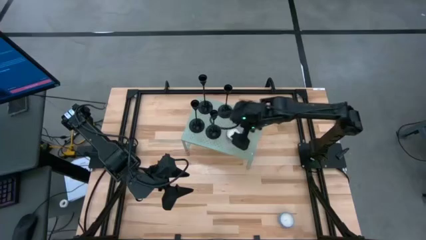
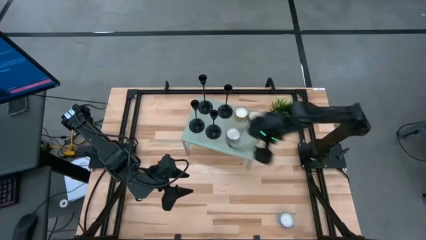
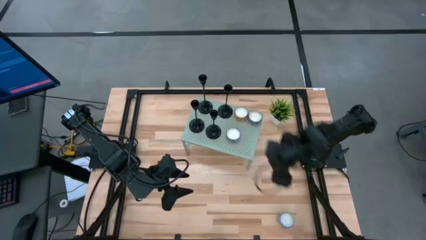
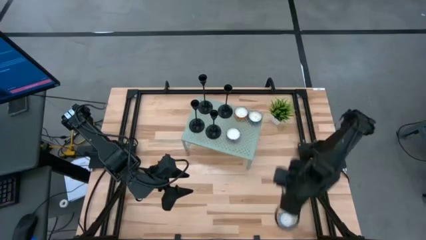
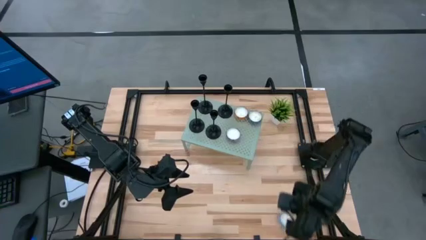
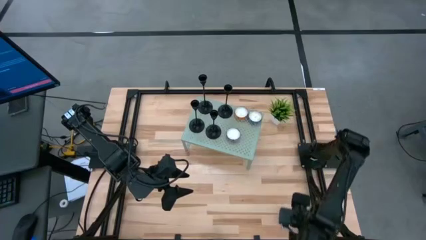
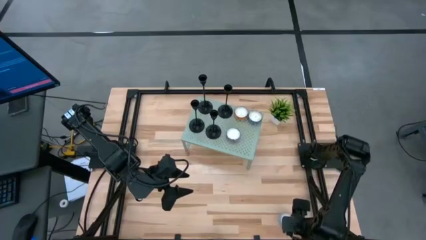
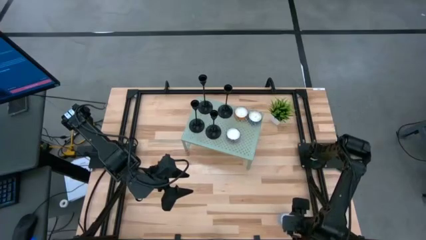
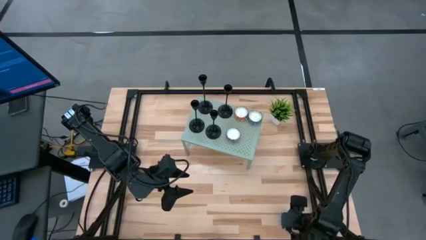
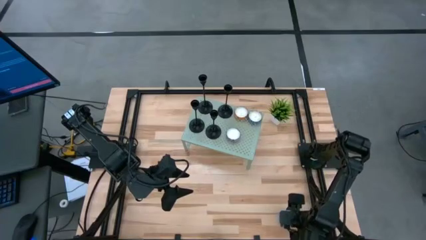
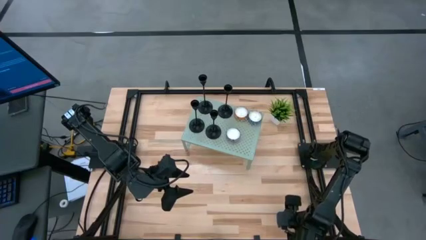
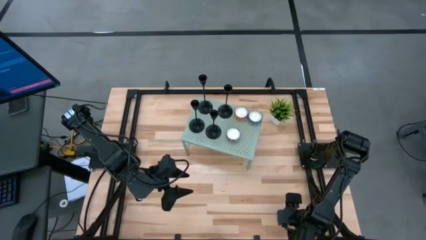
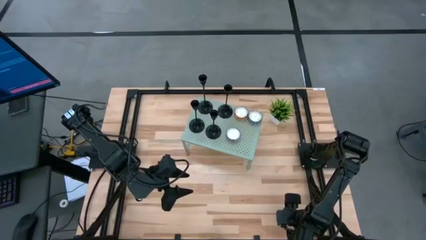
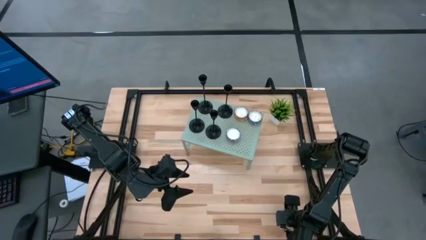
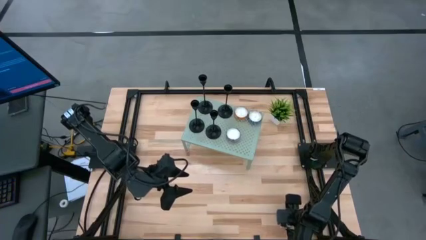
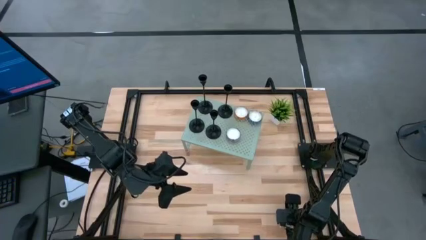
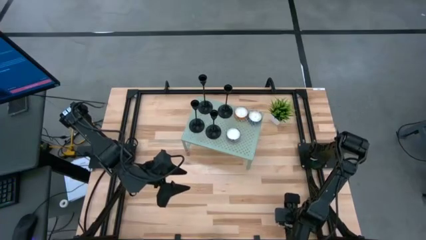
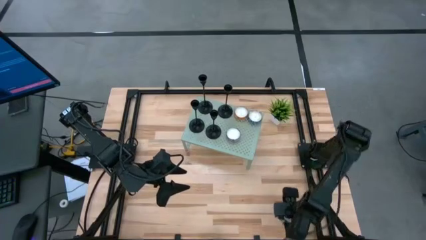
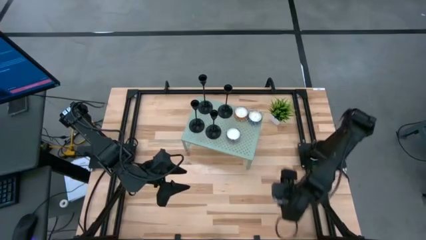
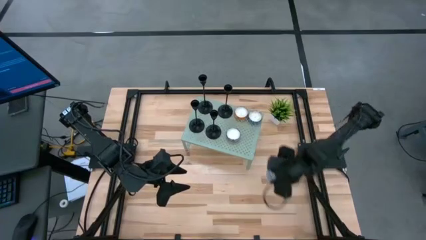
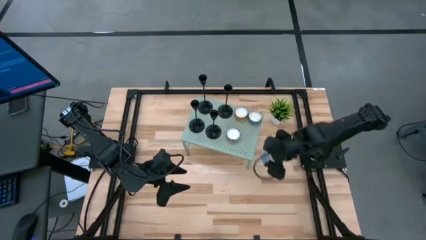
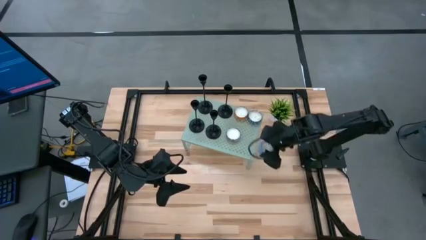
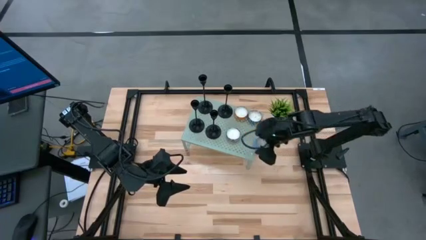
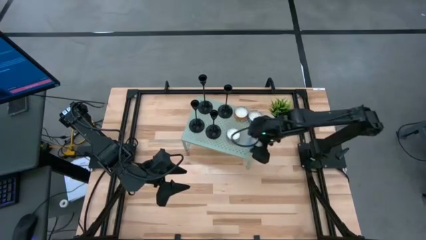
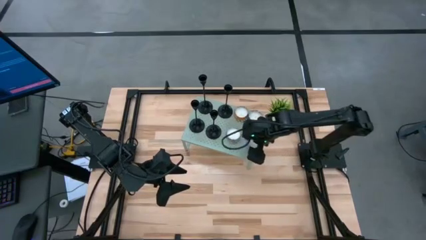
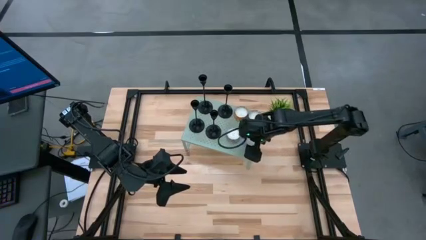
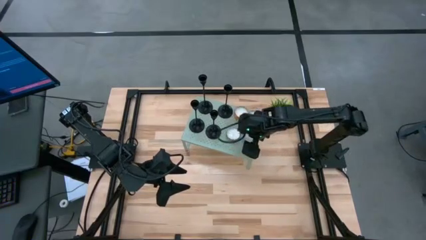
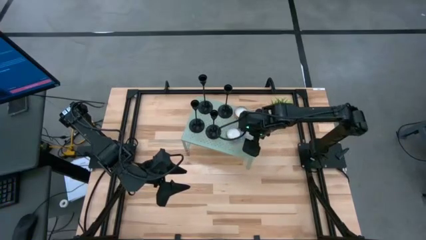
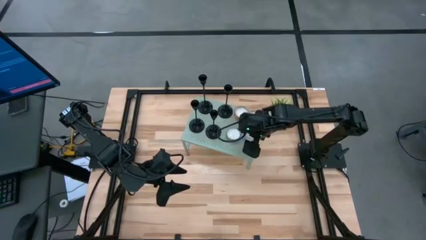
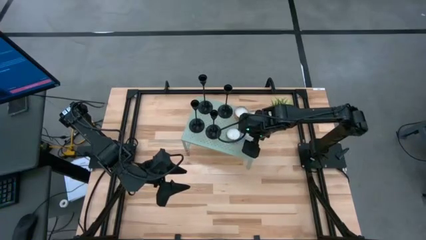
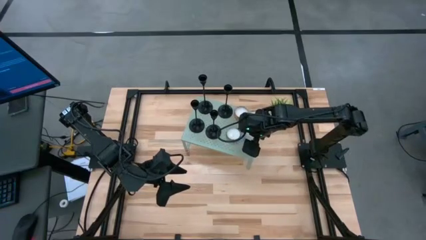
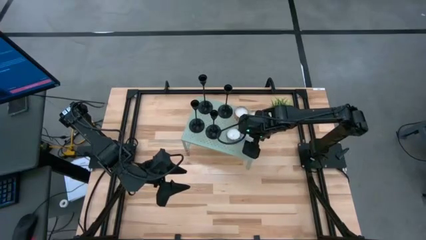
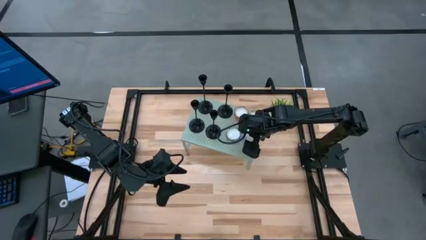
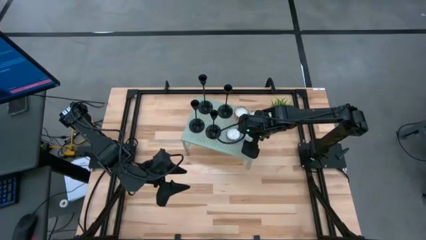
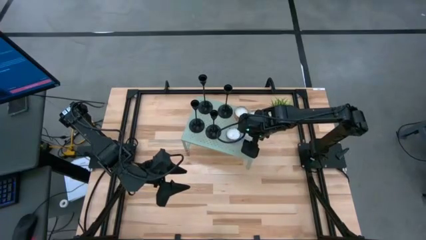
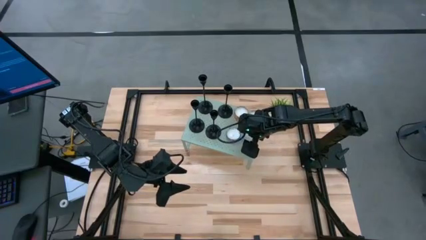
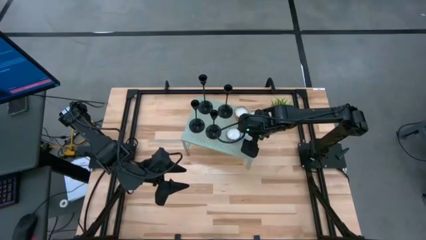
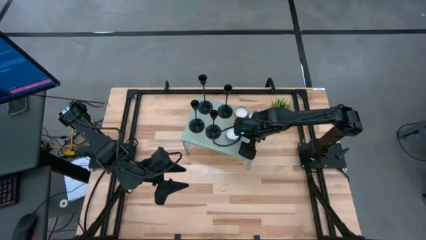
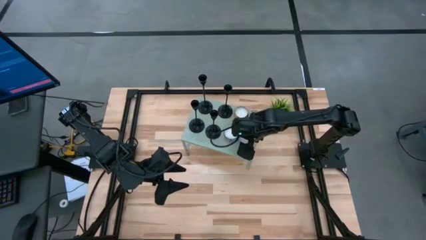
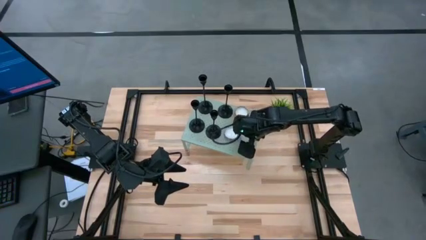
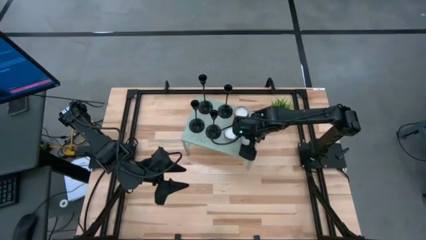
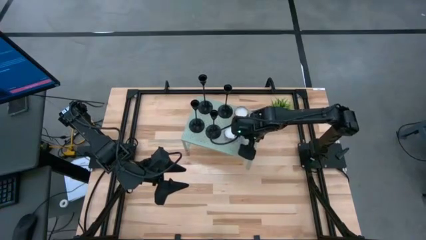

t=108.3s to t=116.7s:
Task: Pick & Place candle stick holders
Put the light blue scented candle on the shelf

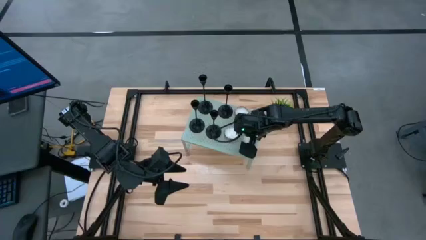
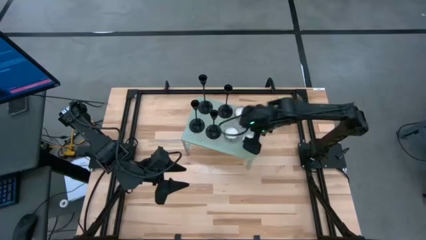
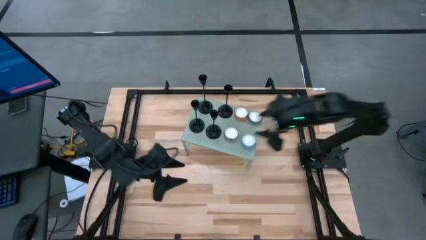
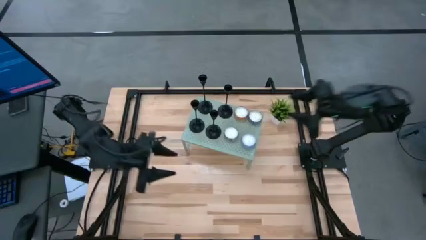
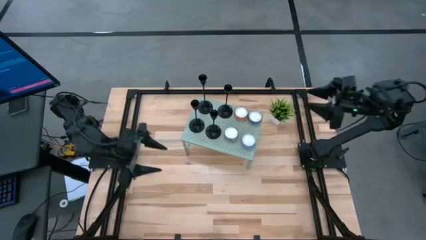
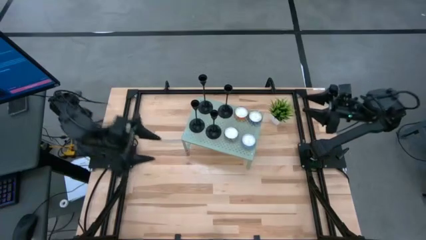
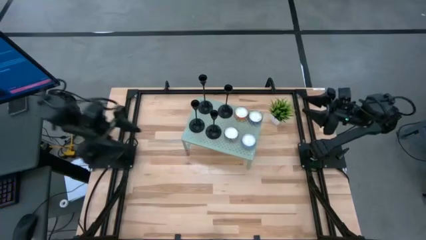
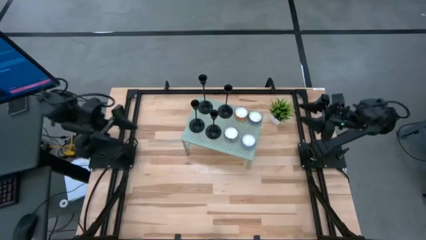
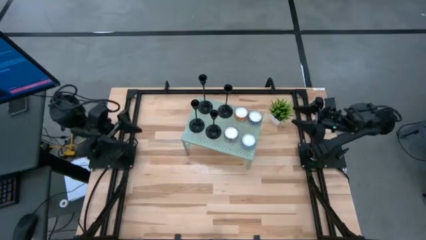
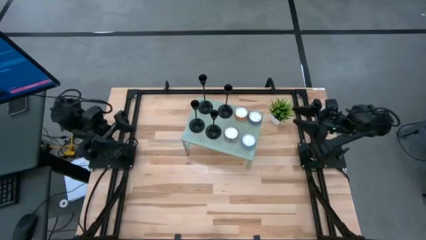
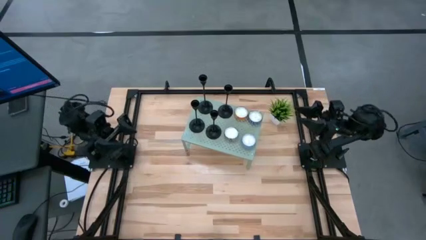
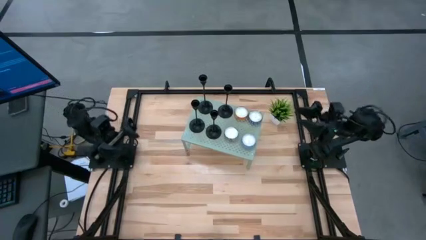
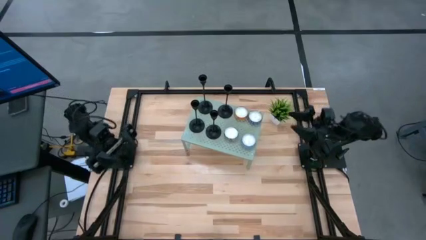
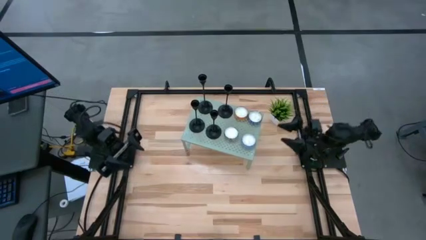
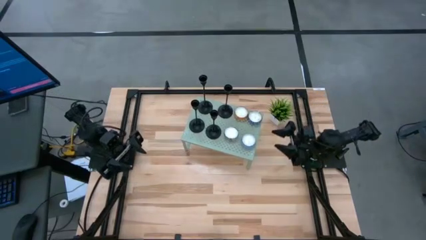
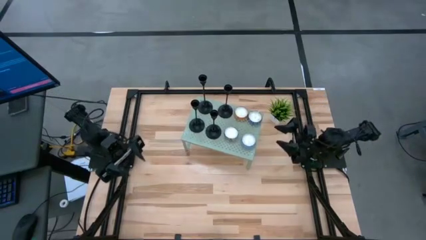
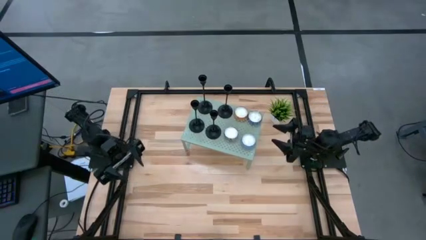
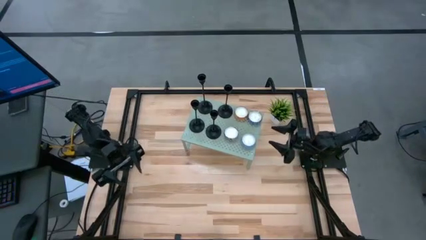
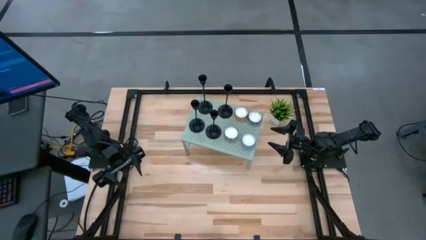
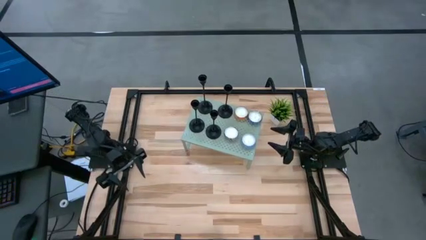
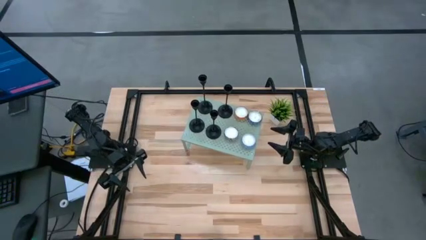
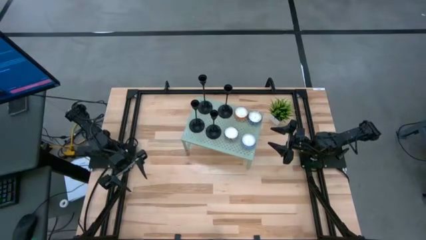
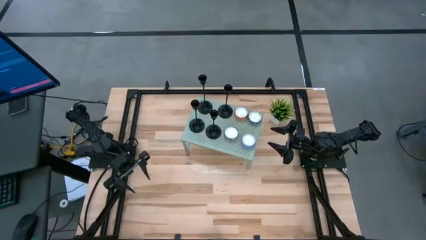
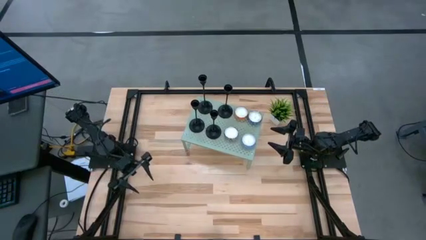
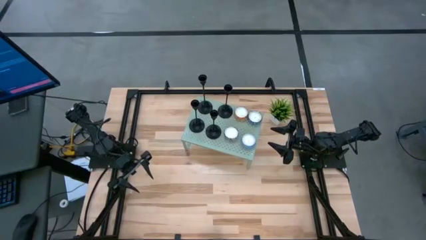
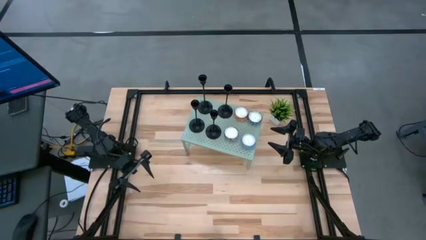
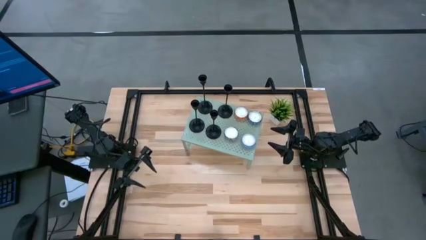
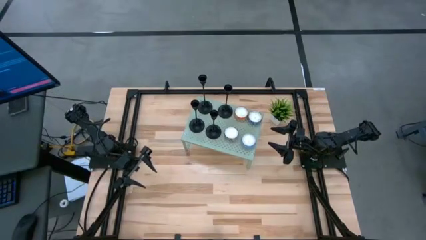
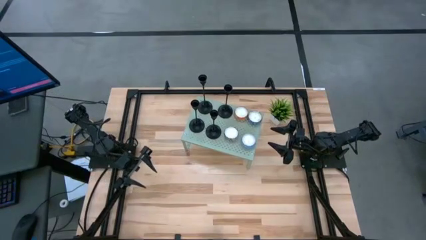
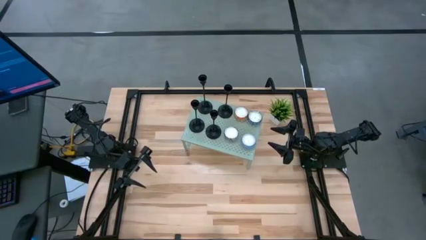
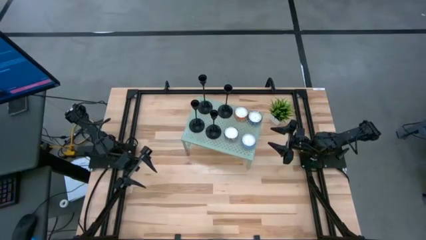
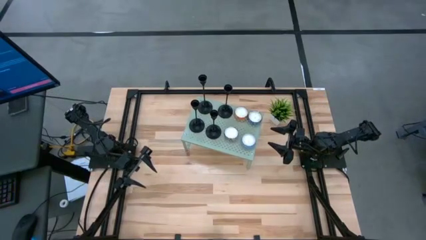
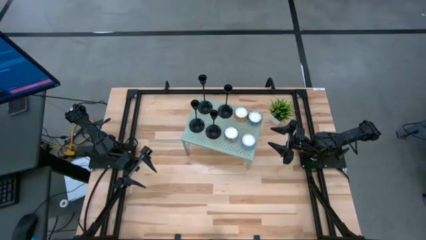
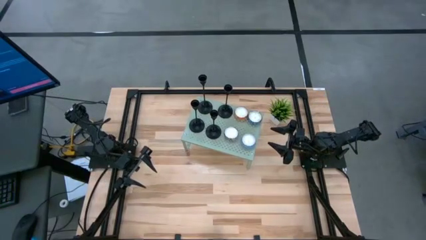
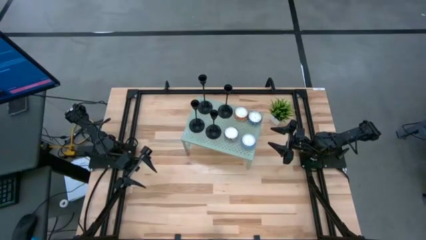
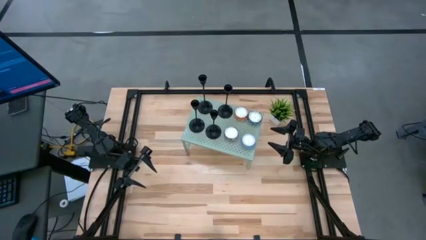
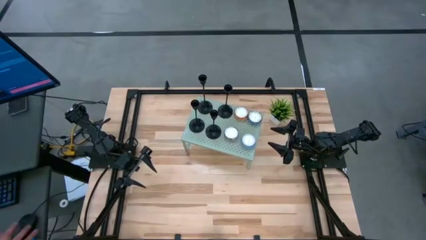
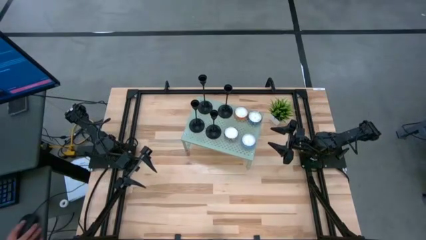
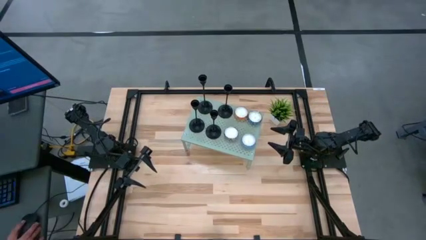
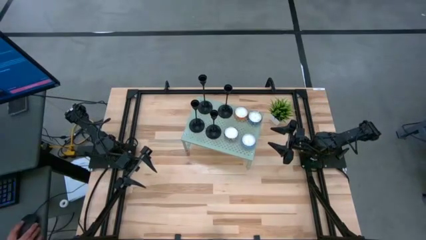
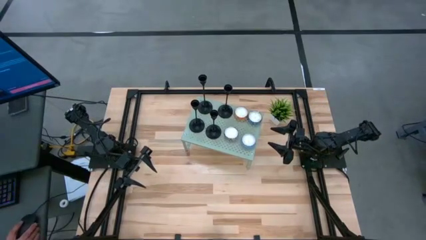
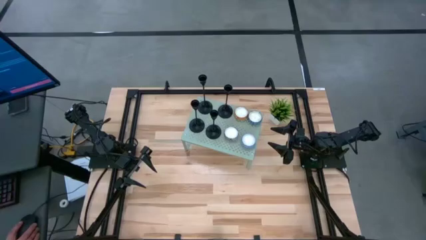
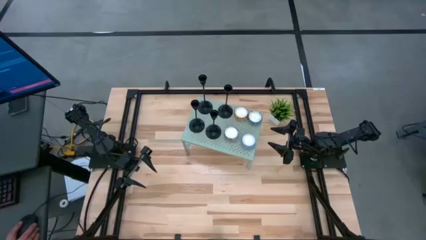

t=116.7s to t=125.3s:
Return to Home Position
